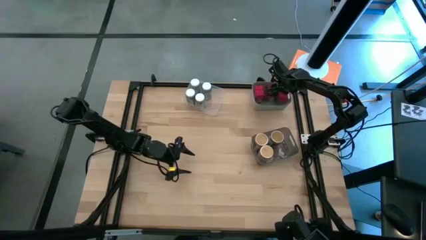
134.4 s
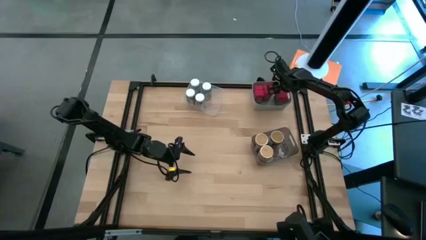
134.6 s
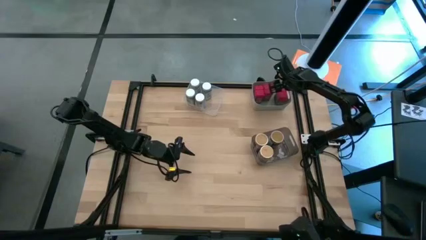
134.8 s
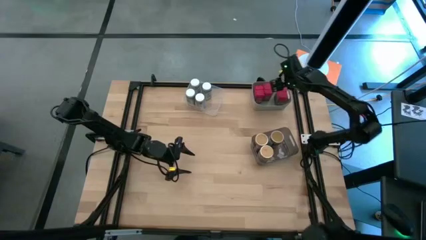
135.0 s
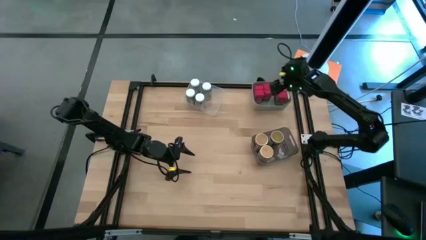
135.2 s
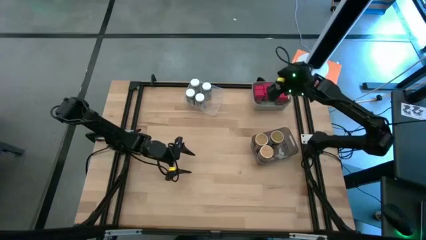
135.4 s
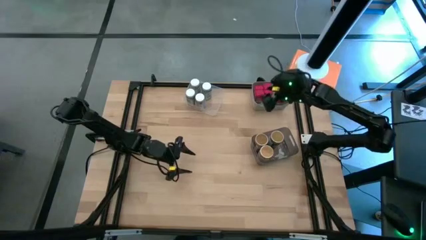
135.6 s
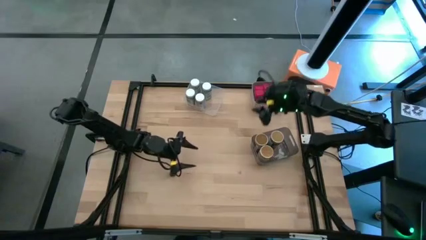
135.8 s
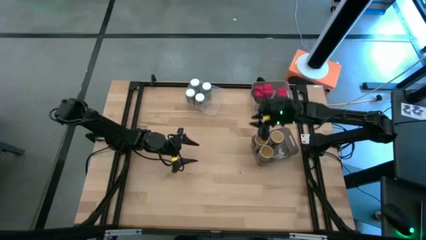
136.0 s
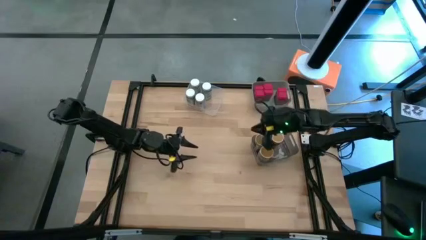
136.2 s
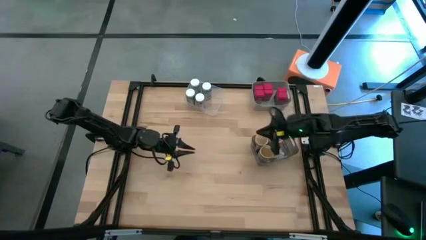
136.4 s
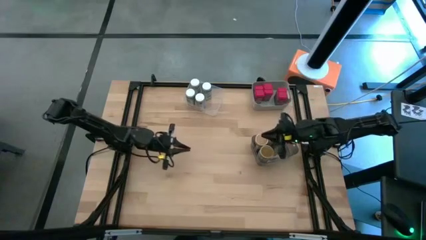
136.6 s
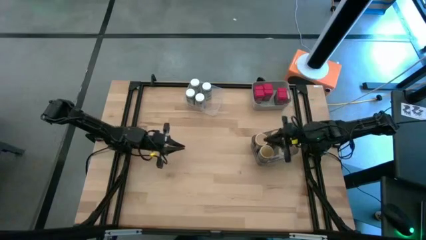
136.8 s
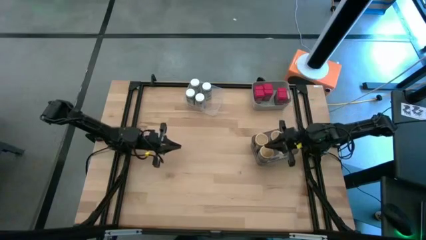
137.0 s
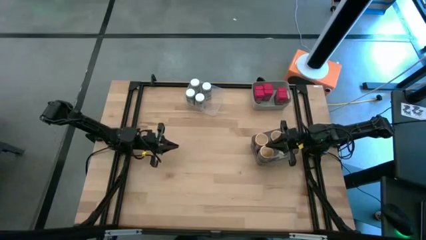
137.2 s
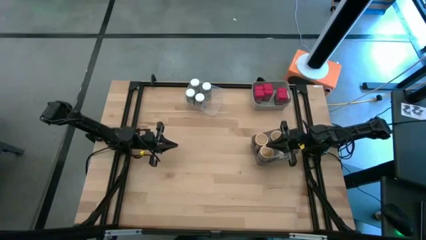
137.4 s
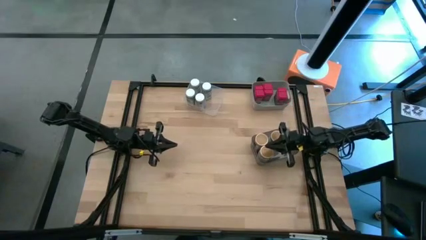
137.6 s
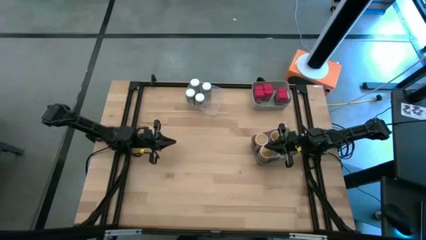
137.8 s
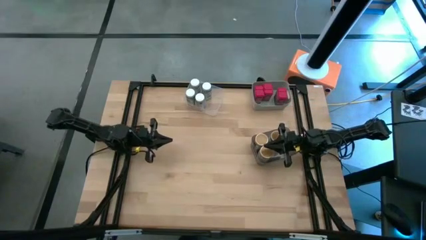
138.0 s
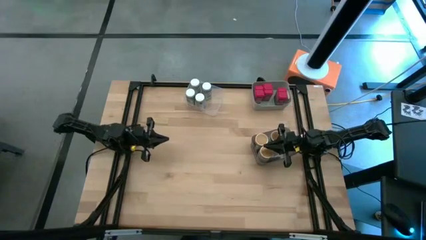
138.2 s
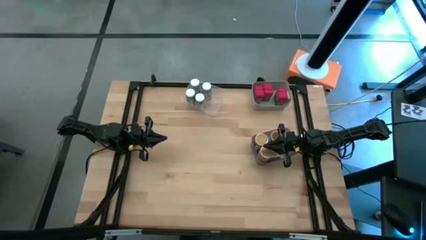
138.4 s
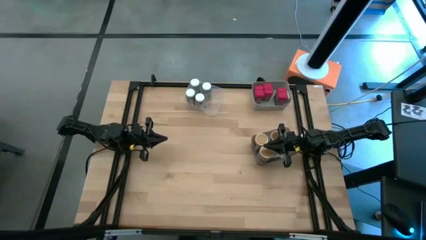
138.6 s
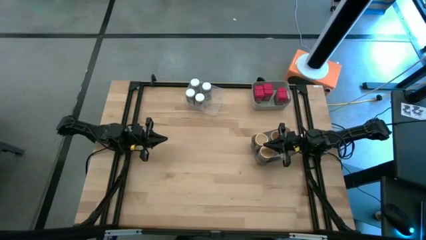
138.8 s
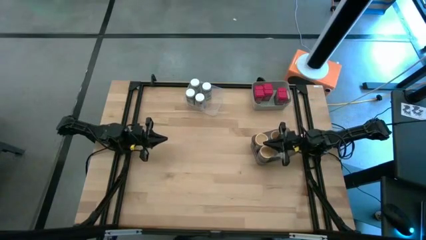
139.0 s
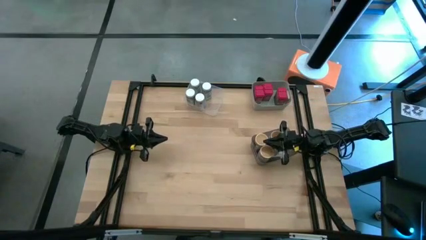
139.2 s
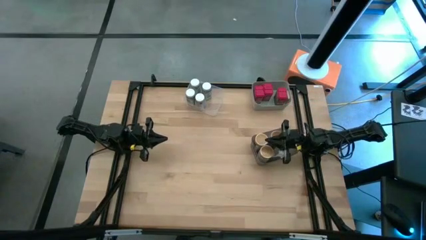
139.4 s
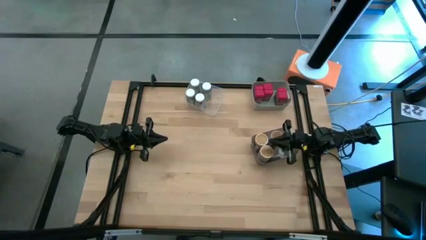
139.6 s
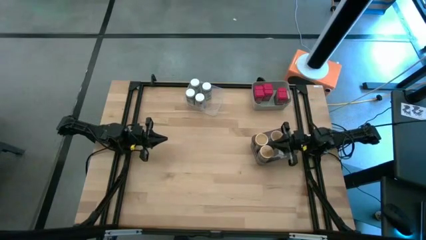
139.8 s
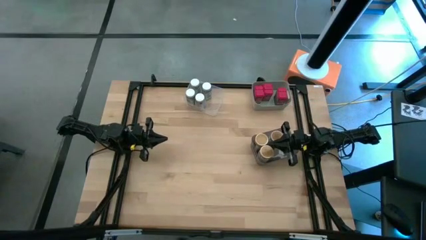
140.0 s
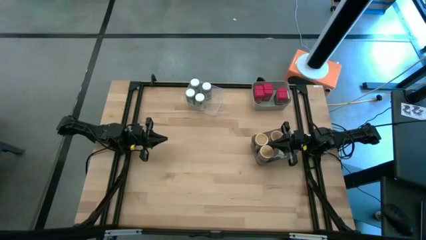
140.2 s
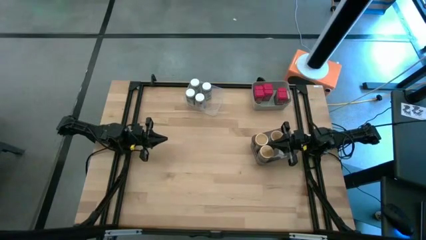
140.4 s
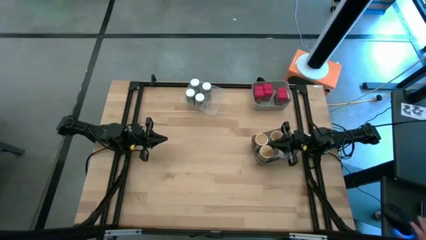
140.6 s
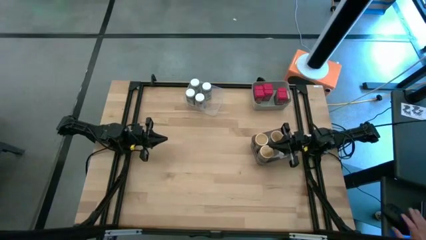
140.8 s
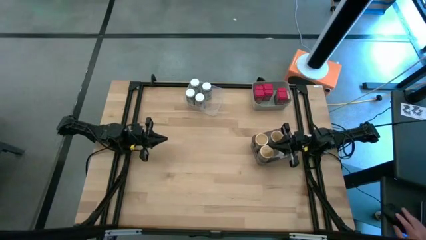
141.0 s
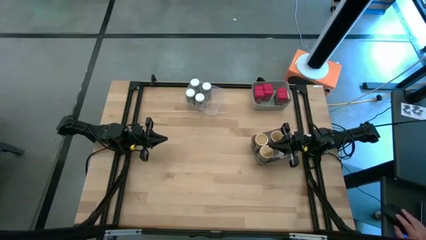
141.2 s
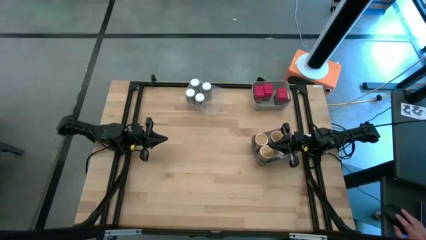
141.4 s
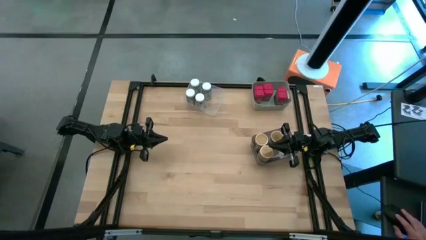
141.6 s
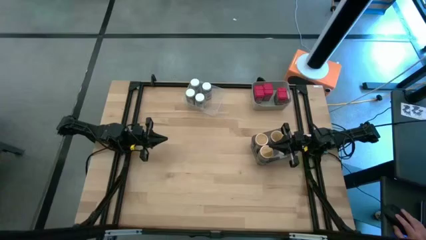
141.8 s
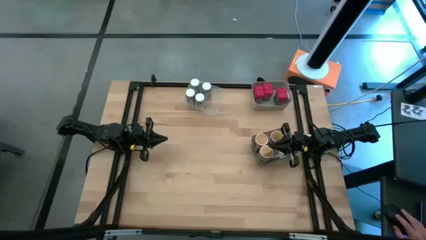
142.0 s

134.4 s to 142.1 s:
Task: Sort spices by type
Return to Home Position

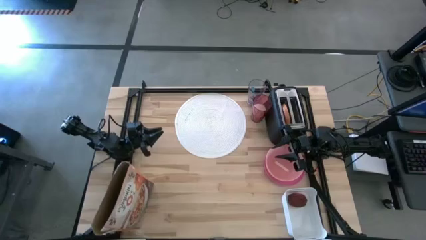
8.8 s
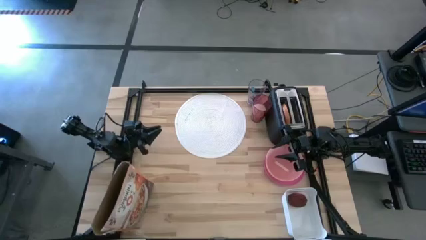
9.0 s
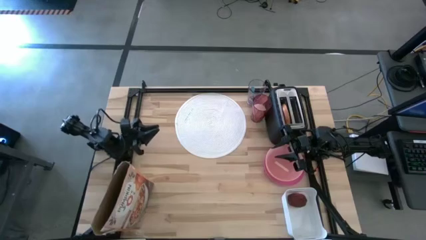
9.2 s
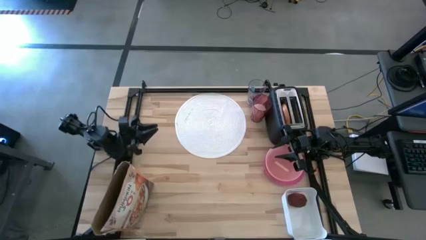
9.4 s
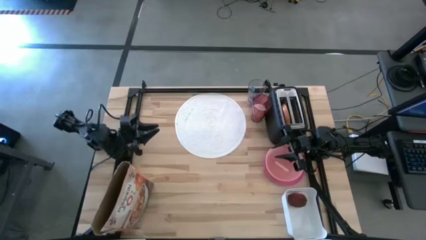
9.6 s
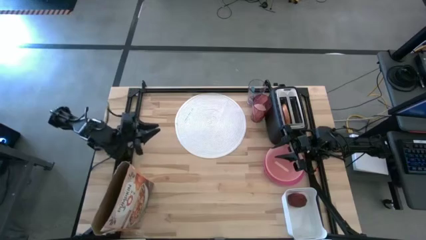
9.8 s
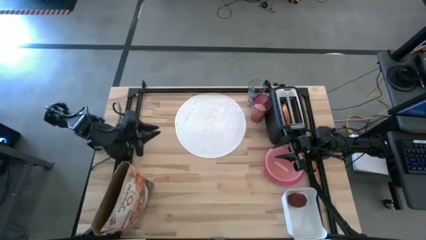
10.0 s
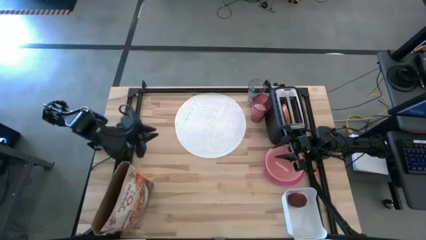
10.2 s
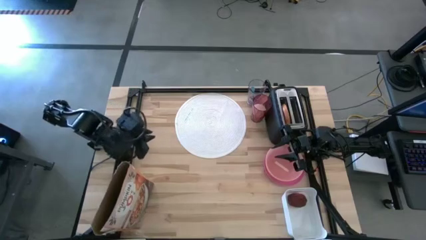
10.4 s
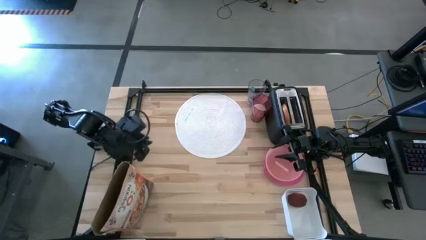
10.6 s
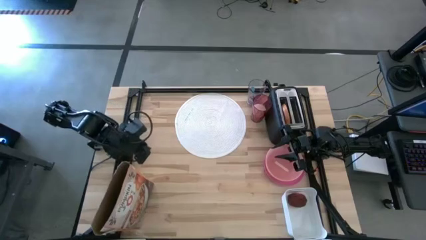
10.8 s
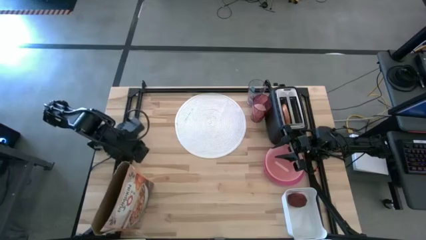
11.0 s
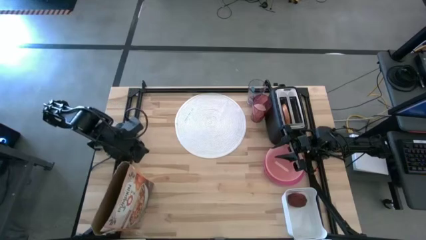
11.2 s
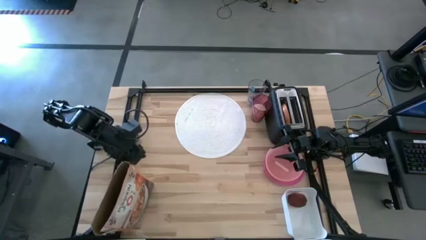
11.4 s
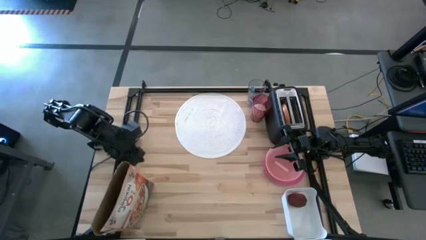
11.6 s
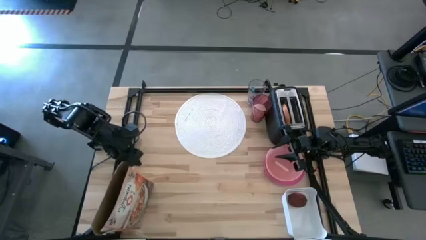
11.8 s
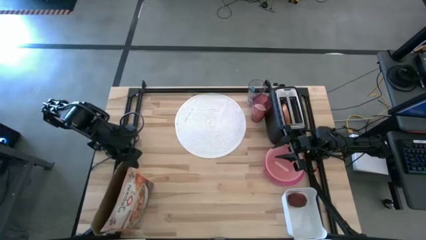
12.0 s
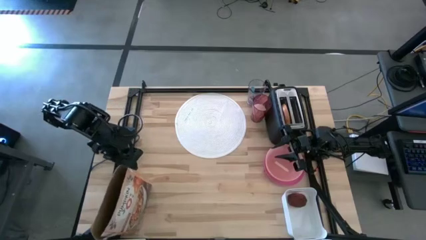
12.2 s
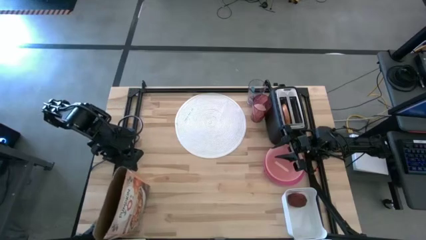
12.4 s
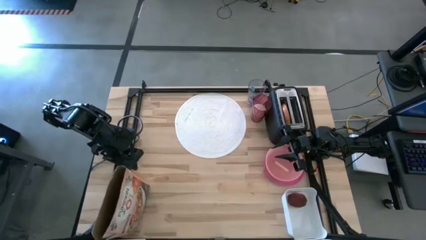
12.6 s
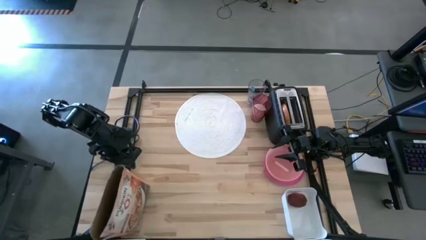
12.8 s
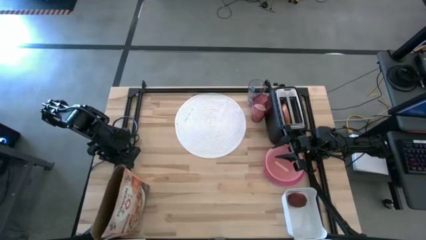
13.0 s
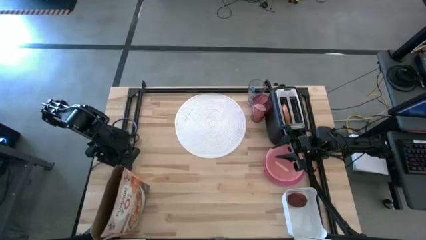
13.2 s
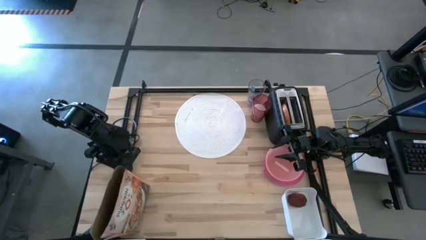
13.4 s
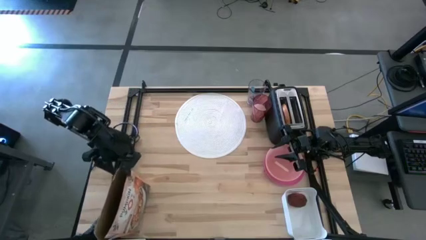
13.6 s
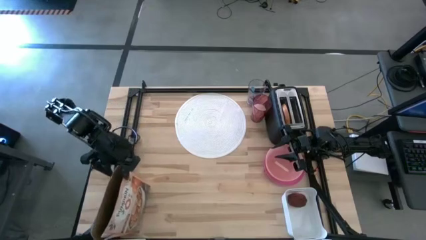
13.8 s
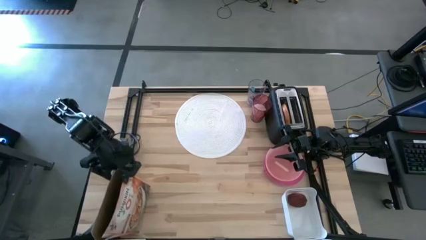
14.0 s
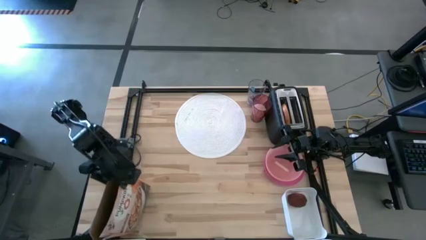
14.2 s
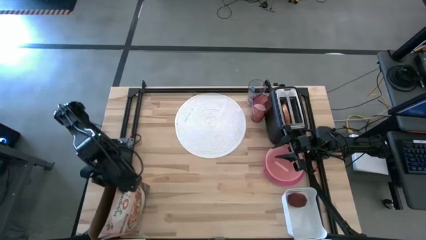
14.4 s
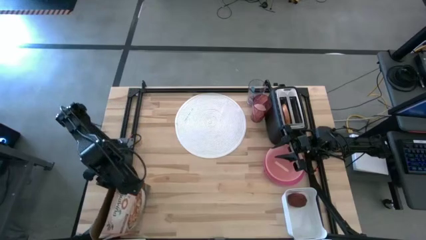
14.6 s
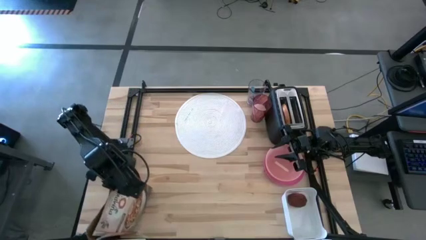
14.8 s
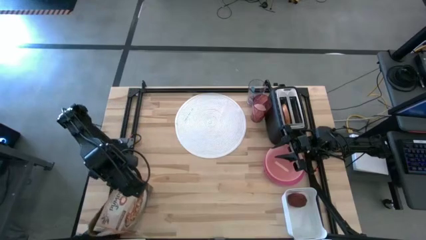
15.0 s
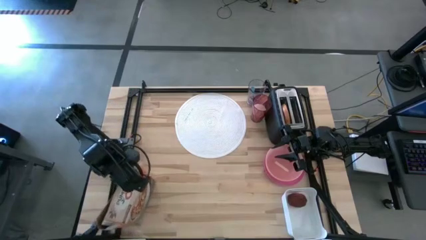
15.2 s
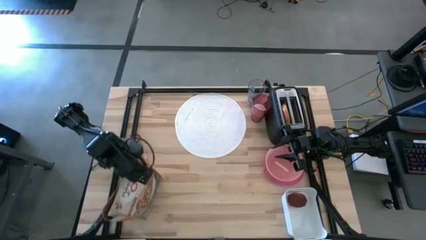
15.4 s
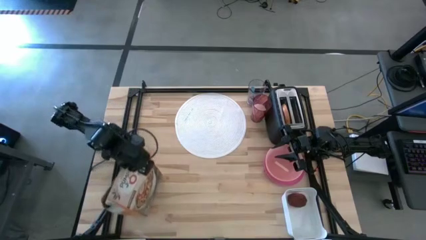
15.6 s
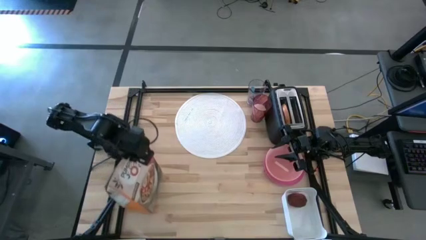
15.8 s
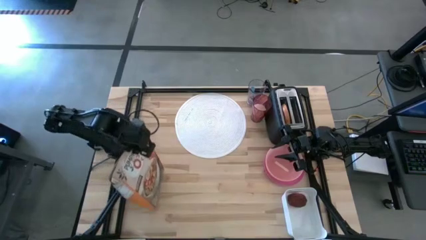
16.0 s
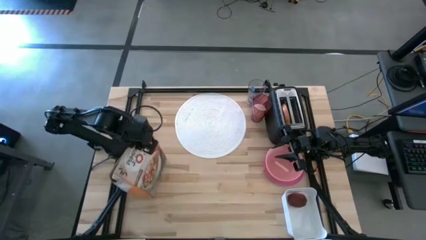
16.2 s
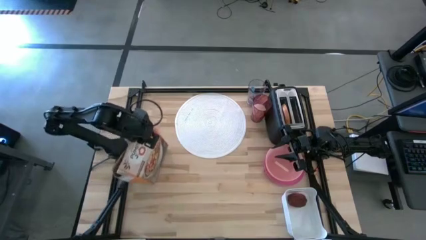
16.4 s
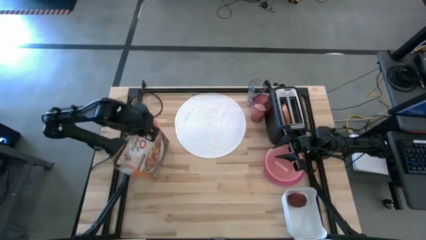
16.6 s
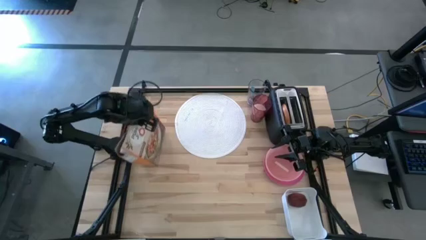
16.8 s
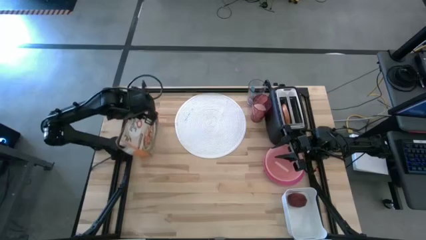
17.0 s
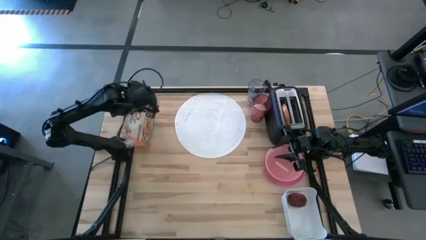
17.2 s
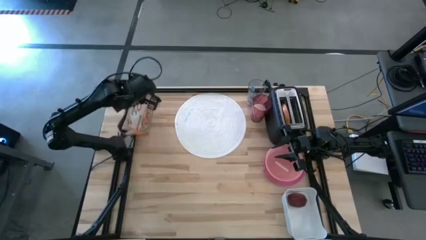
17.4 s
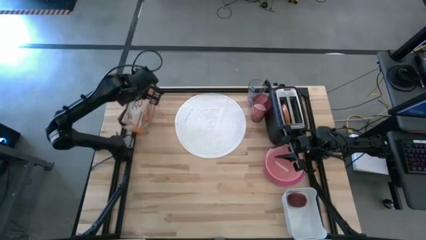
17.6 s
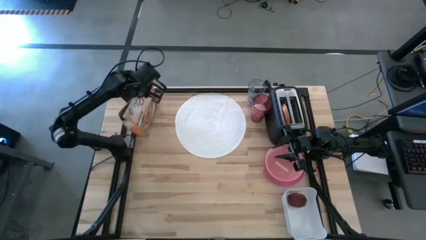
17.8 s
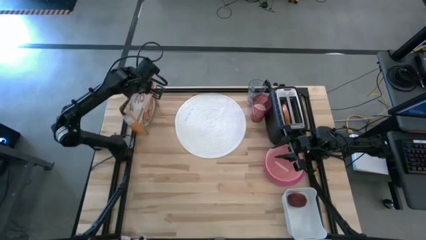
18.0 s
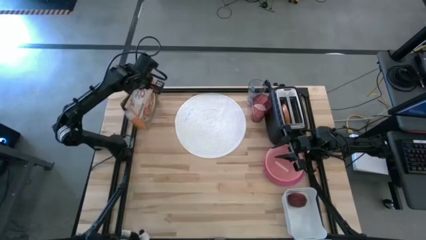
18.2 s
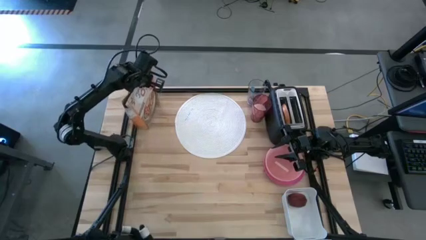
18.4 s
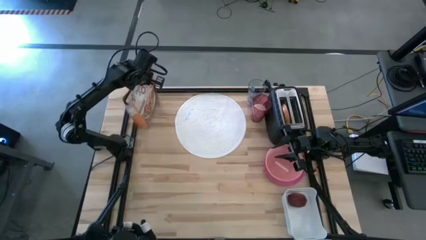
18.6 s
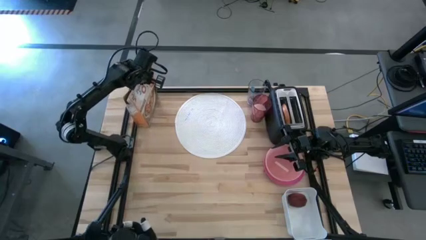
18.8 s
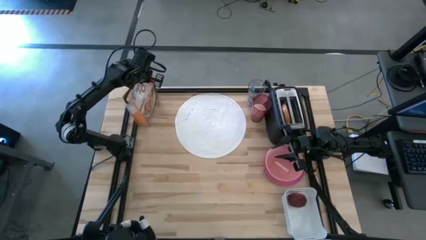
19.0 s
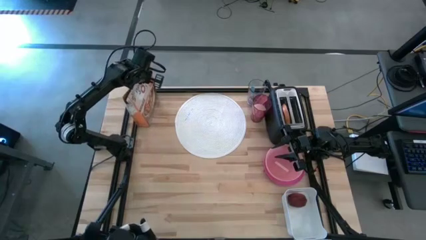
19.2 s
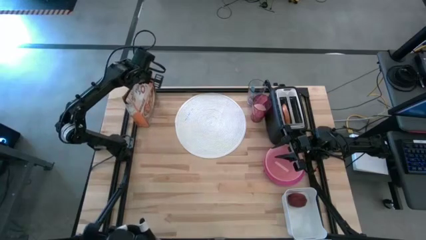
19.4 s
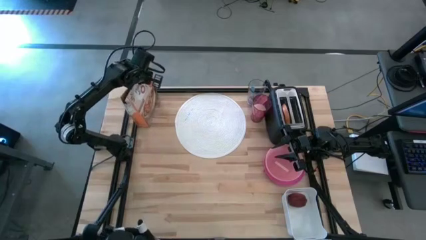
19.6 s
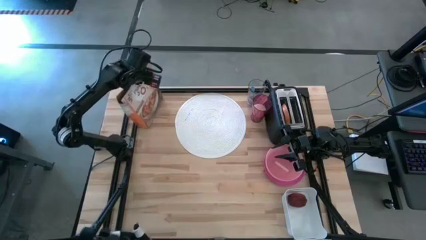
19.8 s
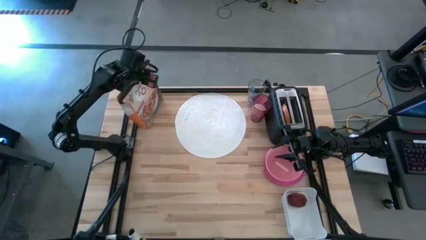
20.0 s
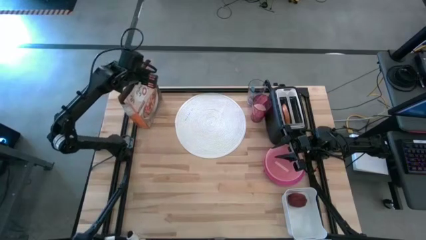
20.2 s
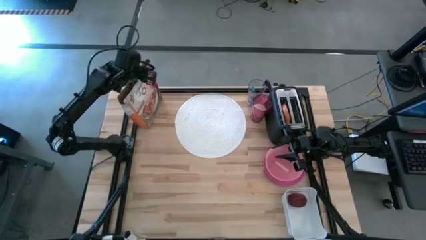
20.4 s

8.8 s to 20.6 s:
Task: Arrange a breakfast setting
Move the cereal from the bottom into the top left of the table
